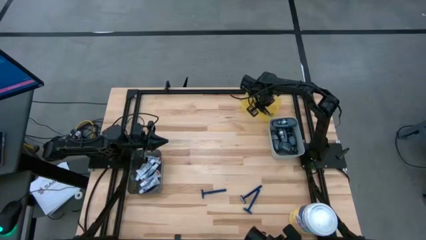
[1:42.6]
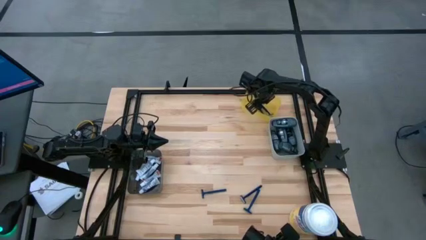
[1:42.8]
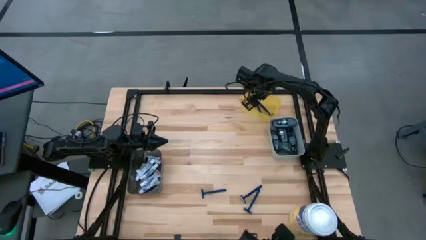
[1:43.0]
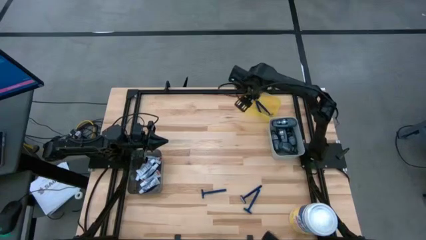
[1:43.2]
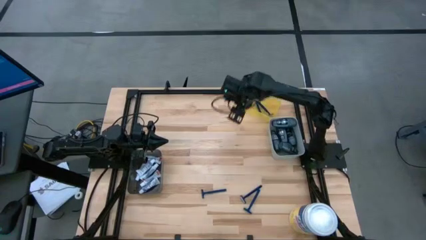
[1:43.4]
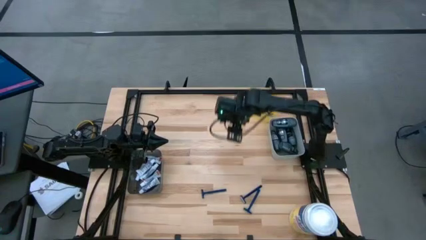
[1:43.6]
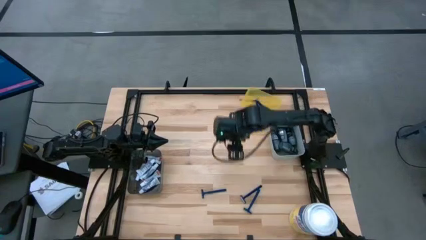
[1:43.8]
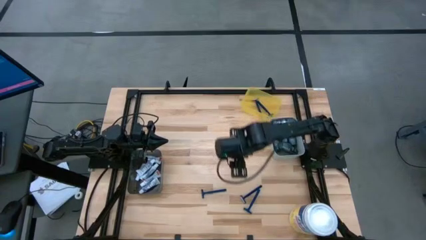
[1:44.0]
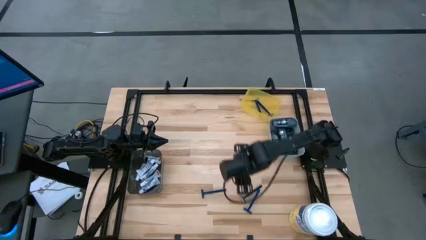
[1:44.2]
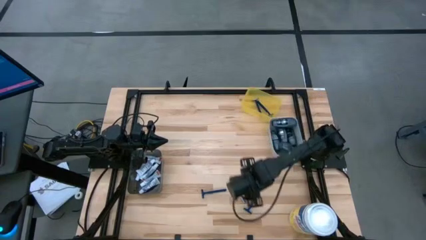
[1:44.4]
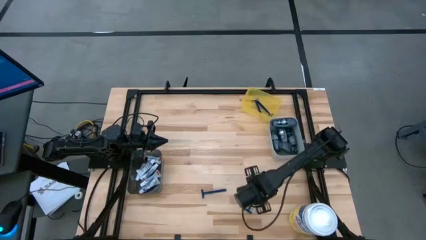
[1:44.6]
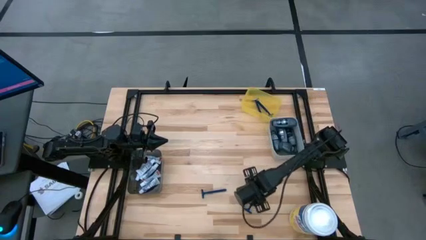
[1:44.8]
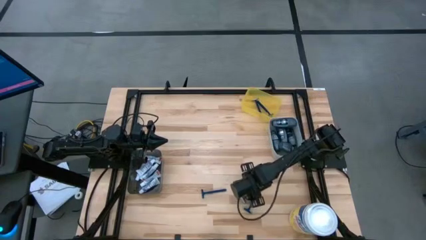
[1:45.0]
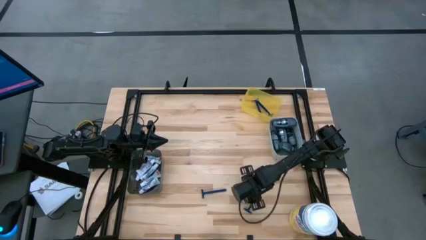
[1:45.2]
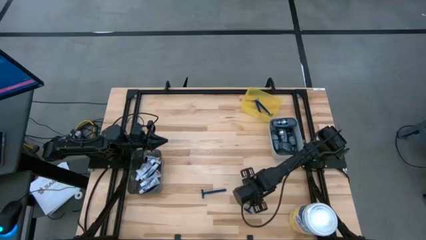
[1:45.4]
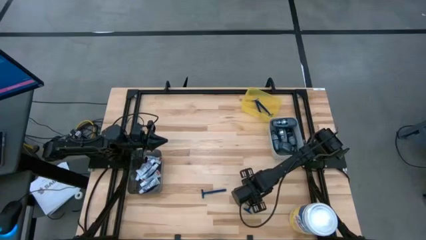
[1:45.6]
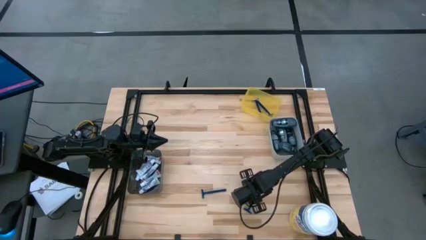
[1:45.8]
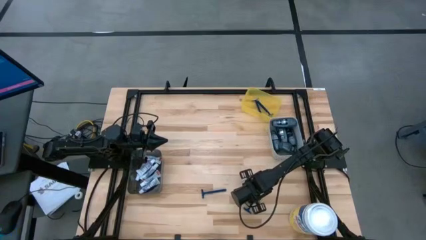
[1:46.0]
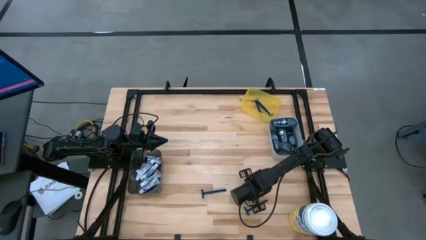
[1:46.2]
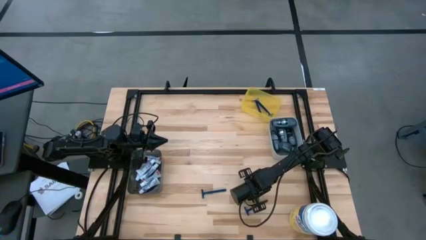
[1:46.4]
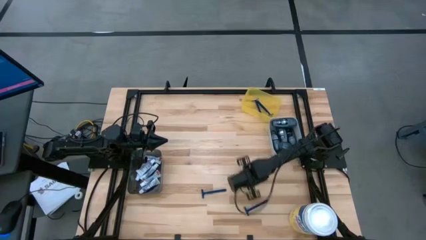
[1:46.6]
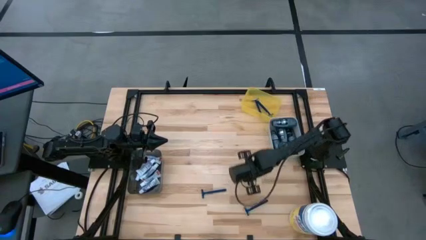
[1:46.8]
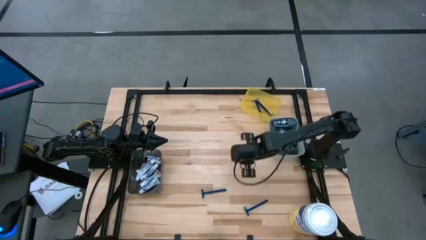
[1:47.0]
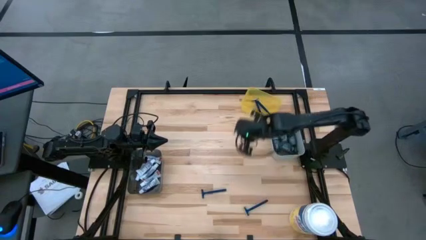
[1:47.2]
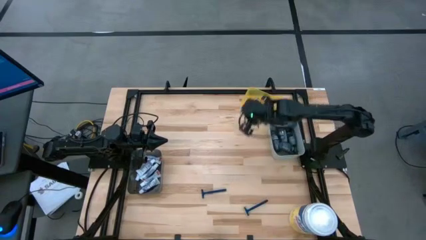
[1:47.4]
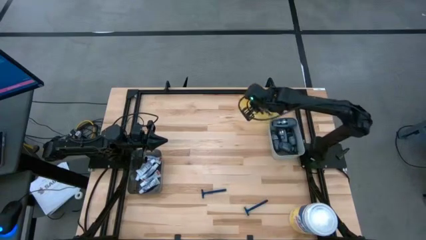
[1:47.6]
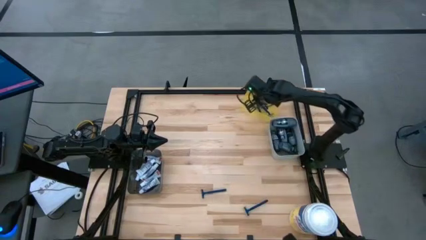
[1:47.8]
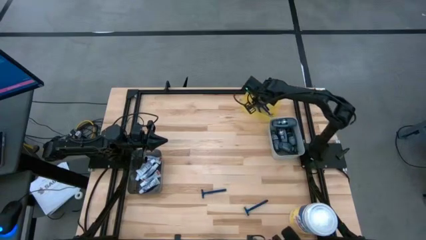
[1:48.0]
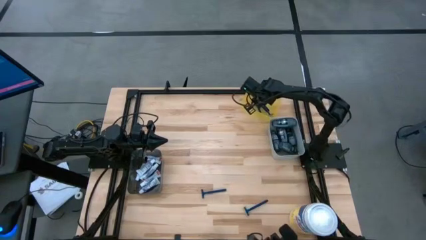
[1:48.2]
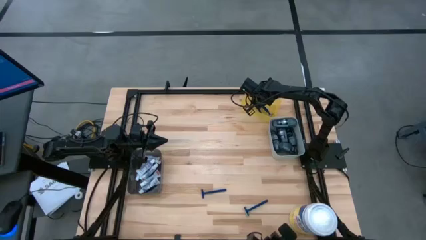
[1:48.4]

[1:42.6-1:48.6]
Task: Pick & Place Travel size toiletries
Put the blue razor into the yellow bin

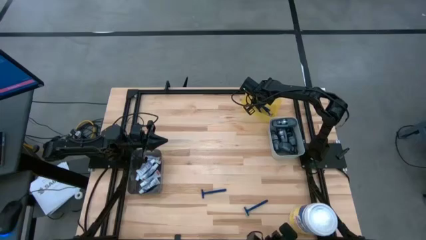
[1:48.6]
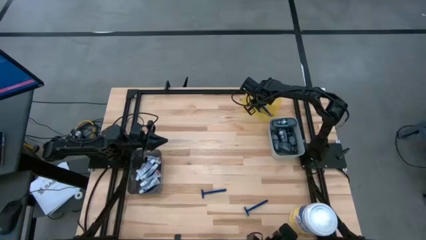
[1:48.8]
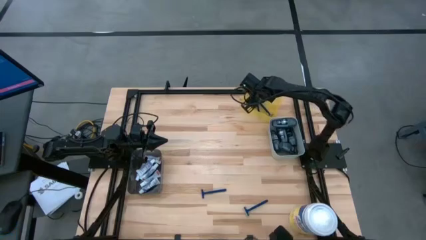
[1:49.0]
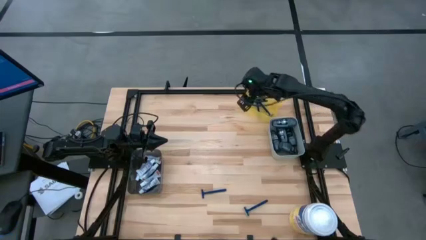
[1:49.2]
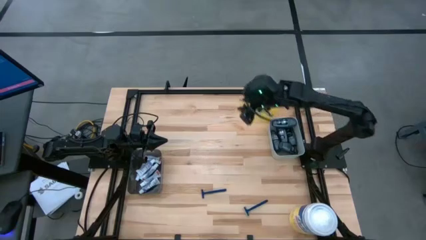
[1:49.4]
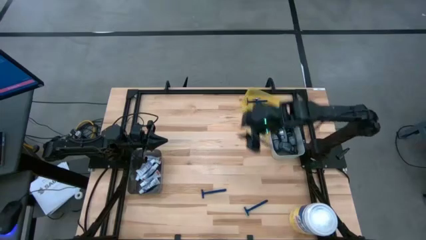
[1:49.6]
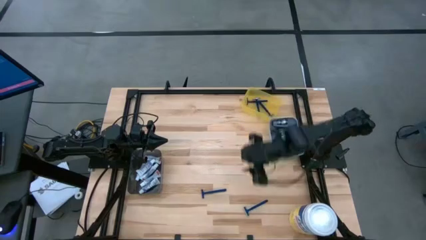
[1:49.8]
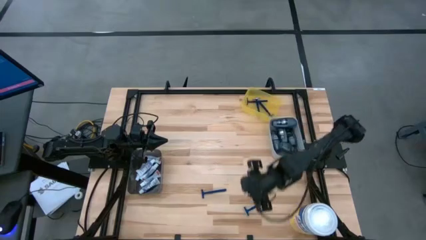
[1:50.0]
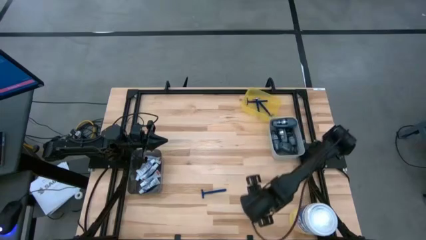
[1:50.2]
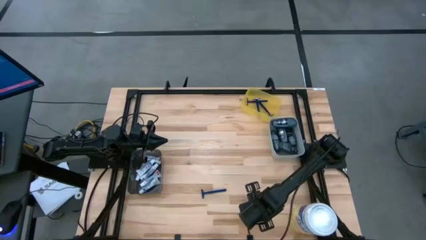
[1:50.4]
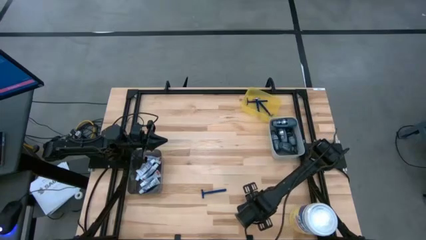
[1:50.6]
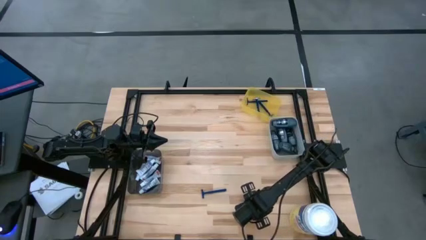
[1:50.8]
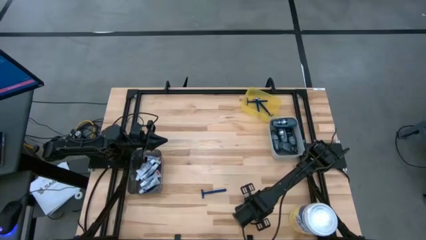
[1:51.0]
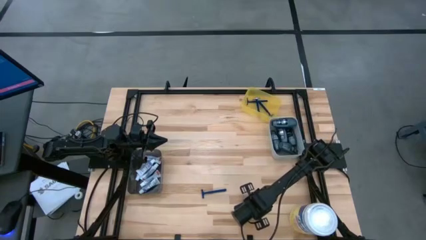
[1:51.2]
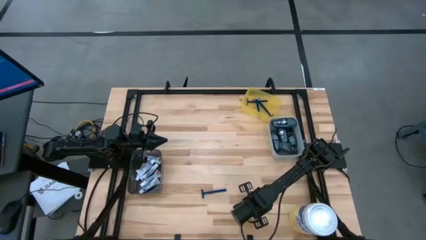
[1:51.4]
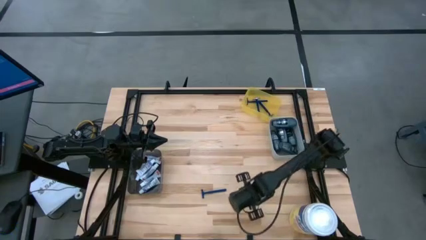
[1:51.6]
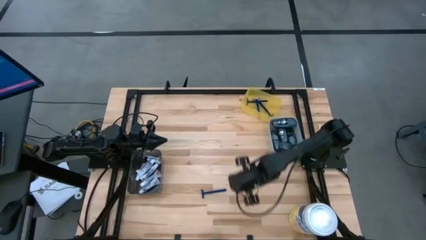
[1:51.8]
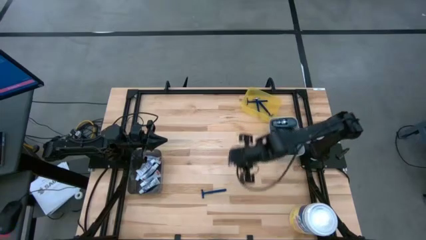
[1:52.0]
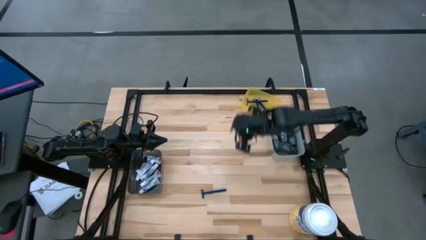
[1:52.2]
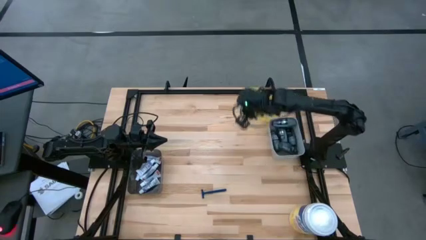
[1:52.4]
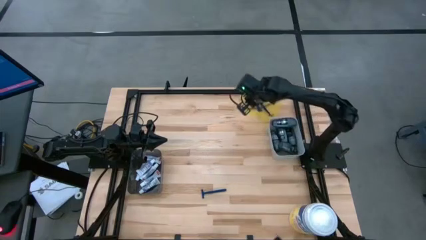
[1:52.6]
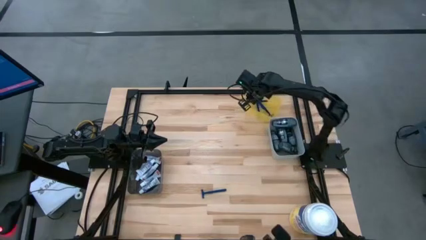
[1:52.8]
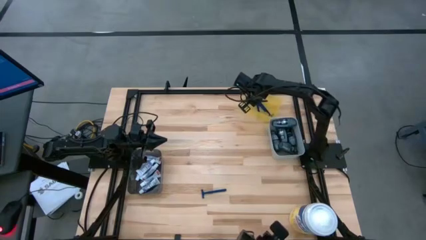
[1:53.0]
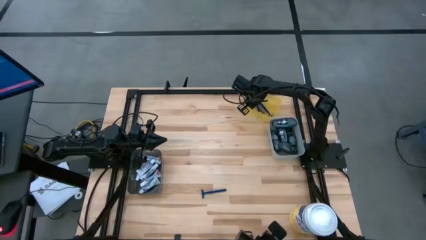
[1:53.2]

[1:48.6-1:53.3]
Put the blue razor into the yellow bin

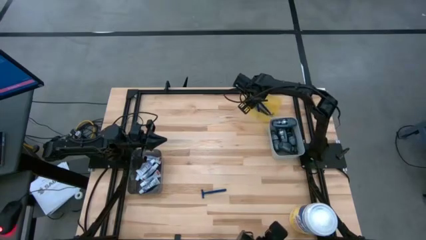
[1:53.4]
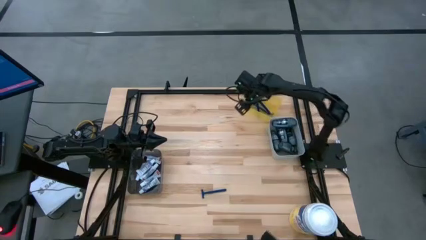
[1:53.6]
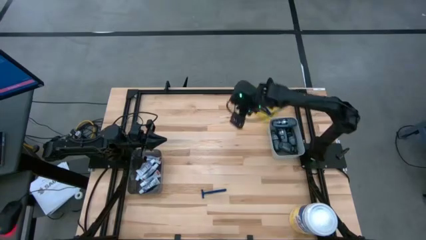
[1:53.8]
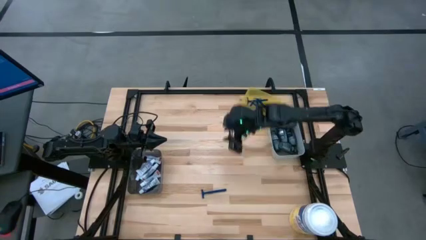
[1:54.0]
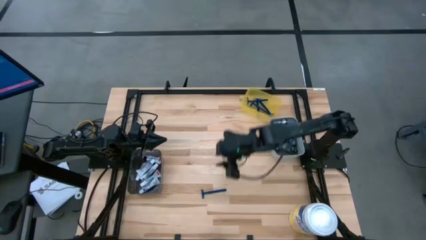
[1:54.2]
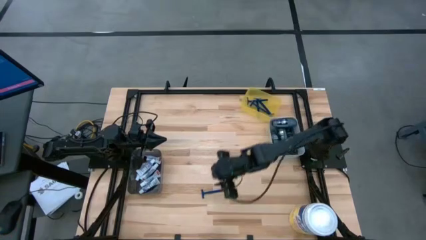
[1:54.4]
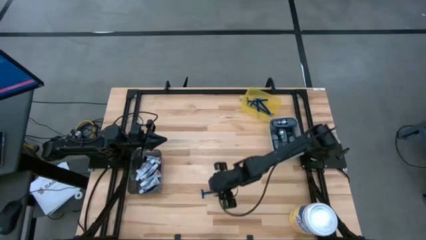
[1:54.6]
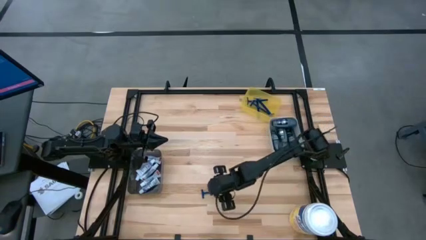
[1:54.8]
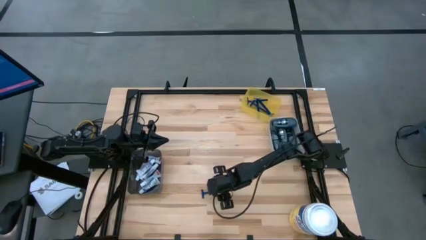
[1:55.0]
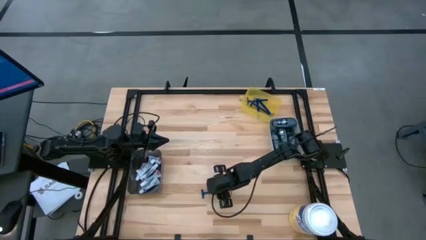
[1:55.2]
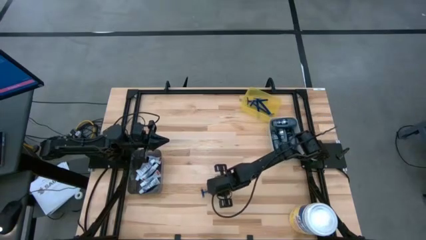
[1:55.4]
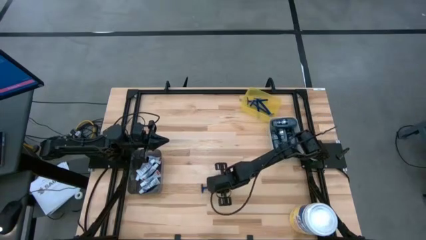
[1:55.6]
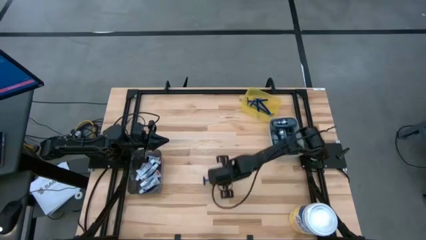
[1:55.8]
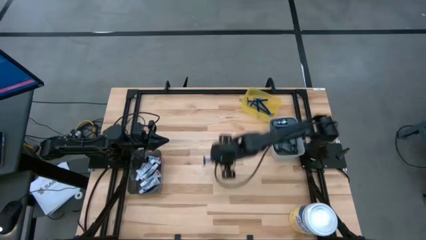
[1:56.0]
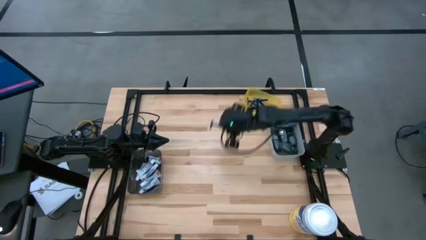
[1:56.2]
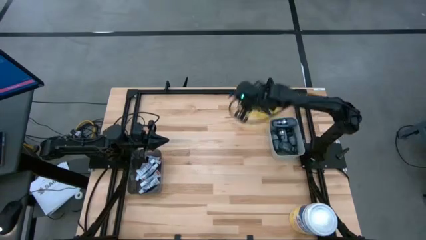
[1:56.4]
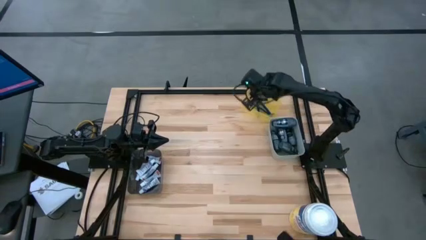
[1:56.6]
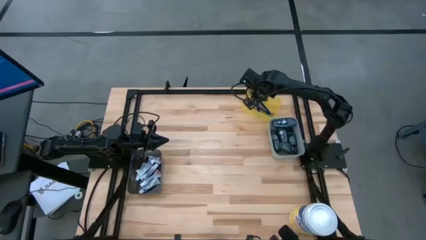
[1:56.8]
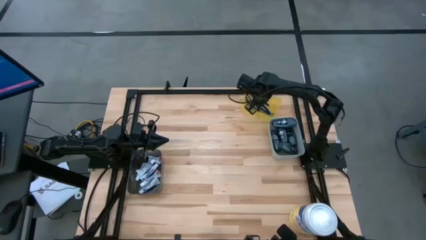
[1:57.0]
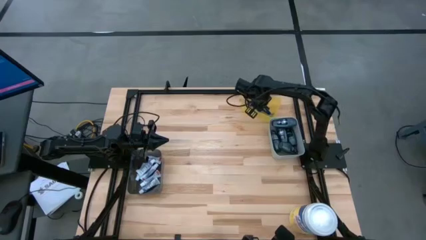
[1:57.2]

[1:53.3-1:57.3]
Put the blue razor into the yellow bin

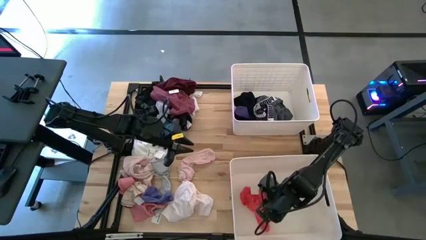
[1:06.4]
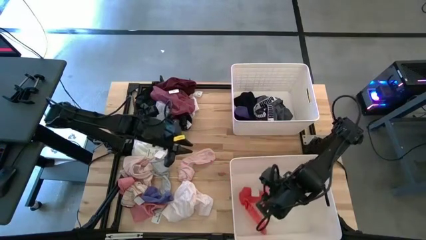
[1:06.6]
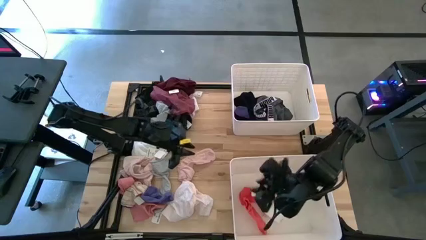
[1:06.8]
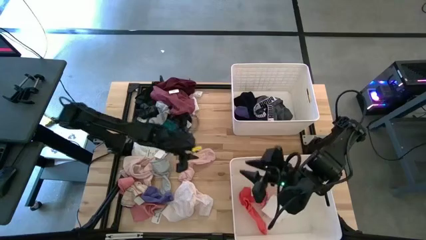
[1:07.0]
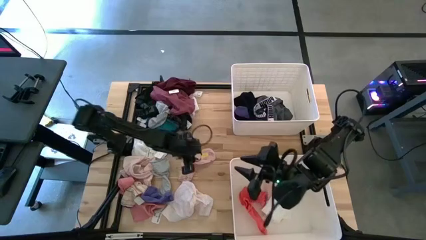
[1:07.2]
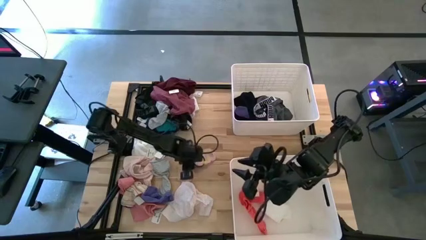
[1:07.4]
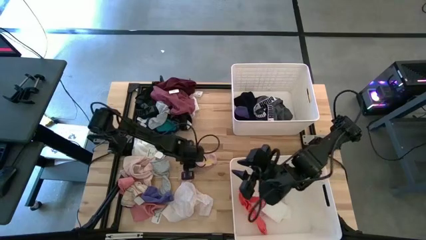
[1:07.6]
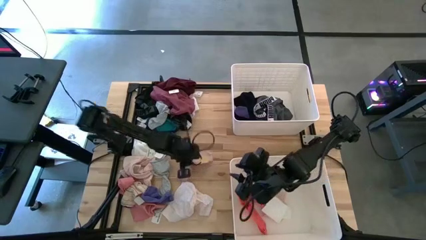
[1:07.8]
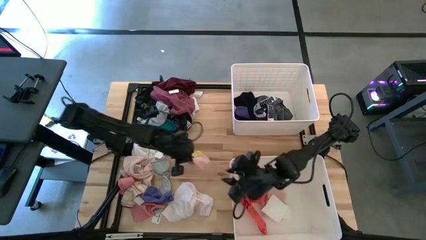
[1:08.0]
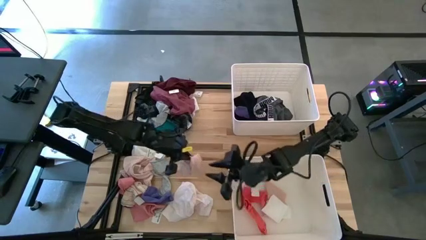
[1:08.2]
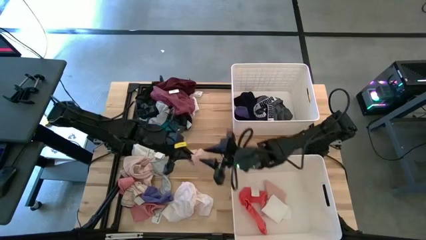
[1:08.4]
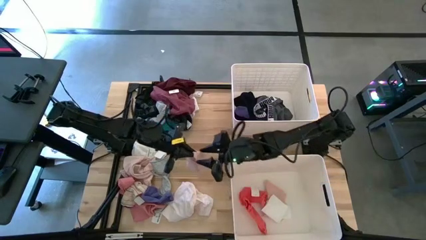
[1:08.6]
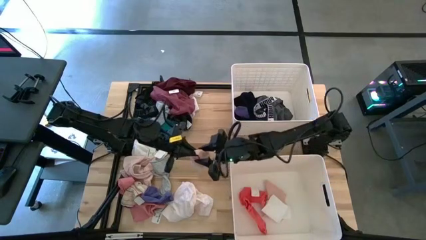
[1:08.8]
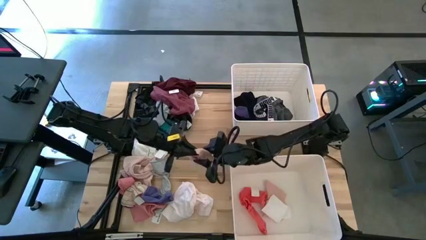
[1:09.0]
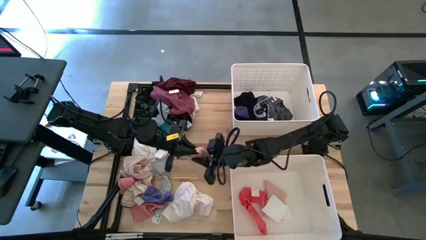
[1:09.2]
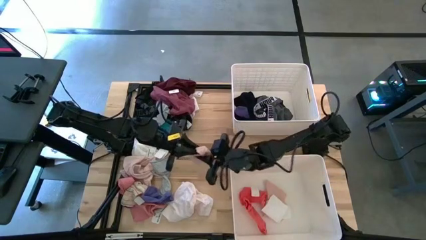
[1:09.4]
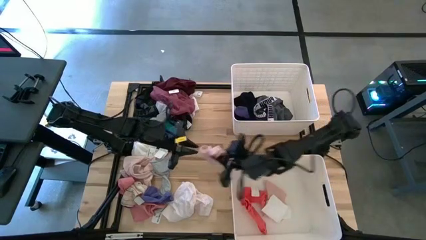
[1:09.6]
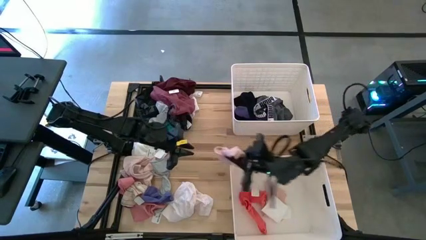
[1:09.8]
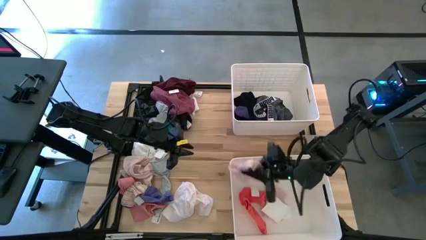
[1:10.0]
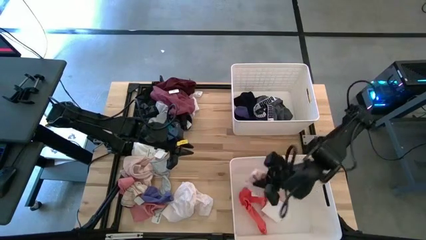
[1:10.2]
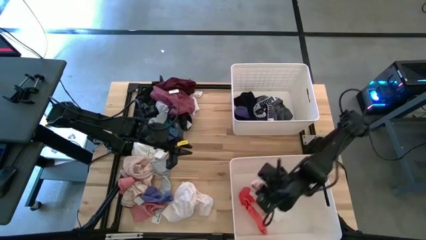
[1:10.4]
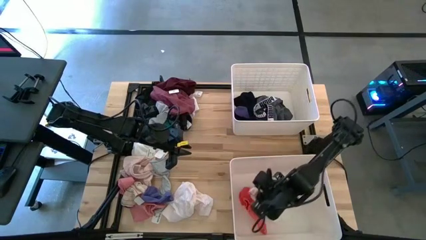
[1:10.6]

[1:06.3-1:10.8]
Task: Sort clothes
Put the pink sock into the bottom bin
